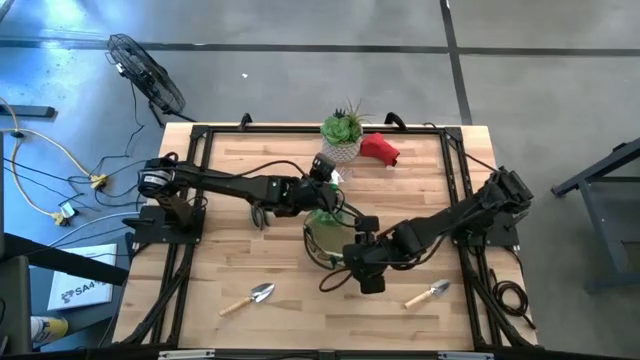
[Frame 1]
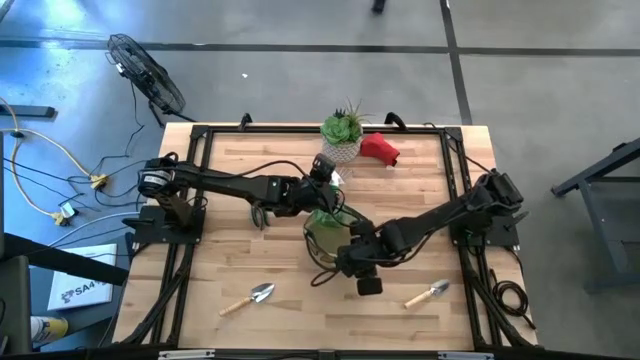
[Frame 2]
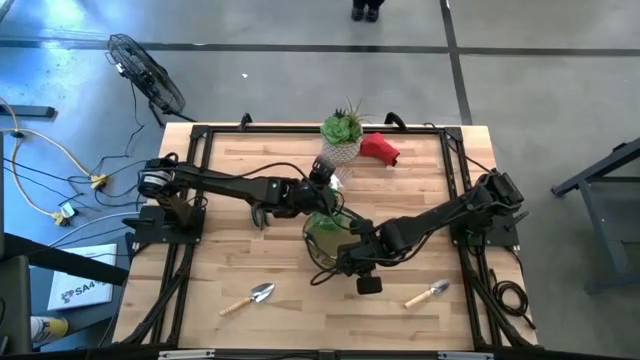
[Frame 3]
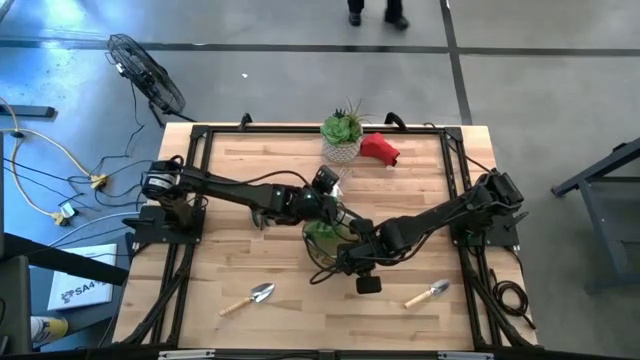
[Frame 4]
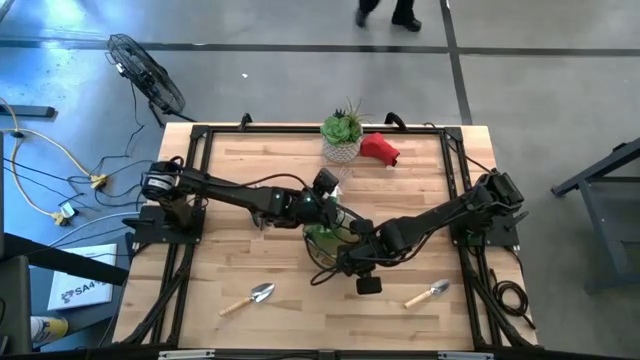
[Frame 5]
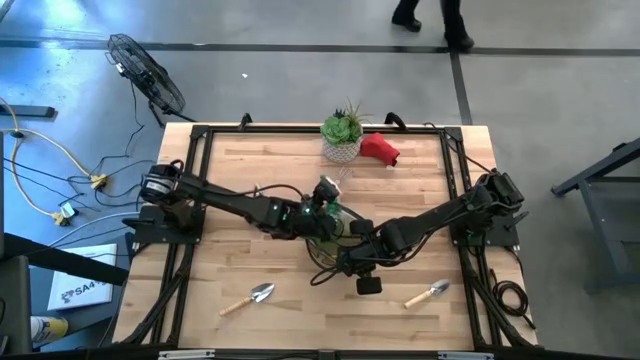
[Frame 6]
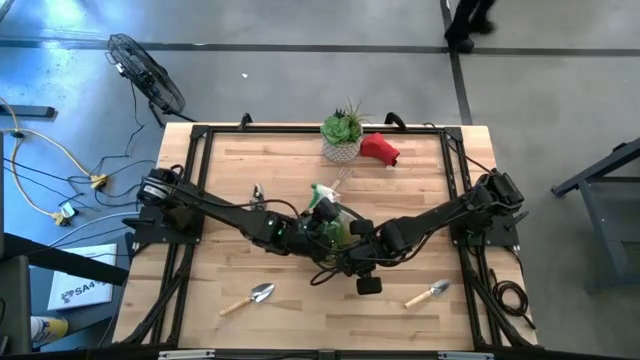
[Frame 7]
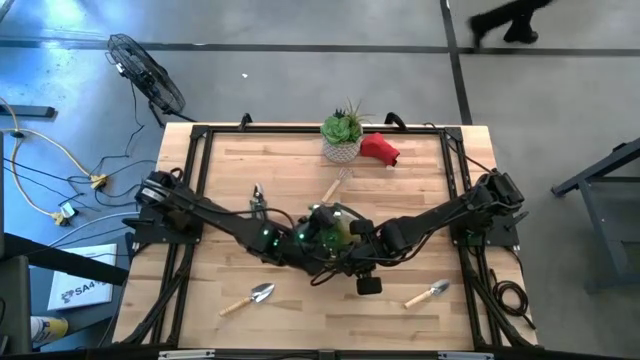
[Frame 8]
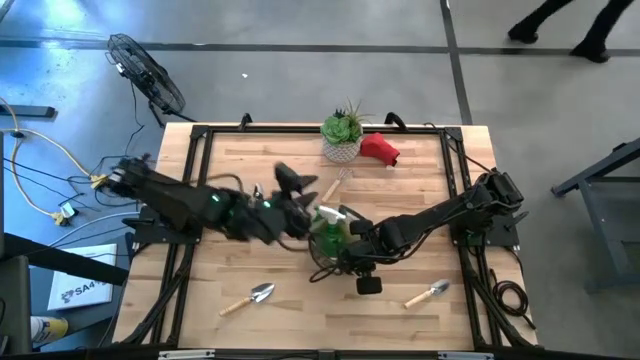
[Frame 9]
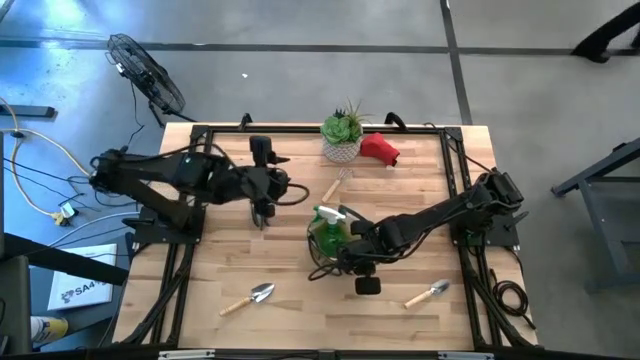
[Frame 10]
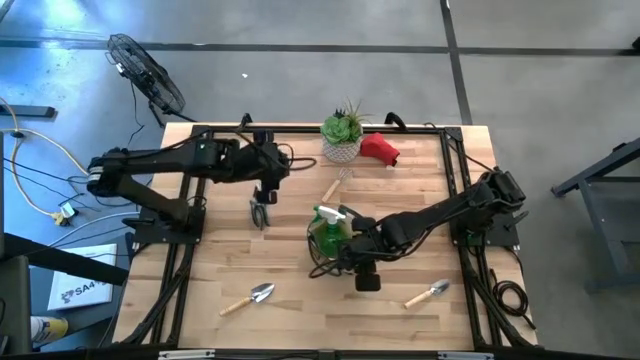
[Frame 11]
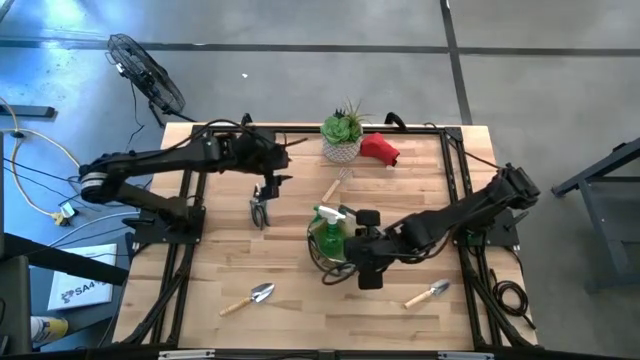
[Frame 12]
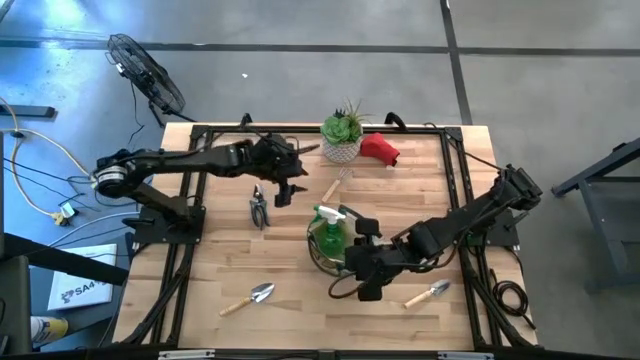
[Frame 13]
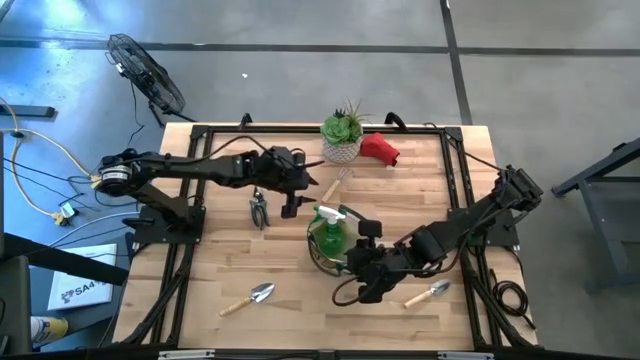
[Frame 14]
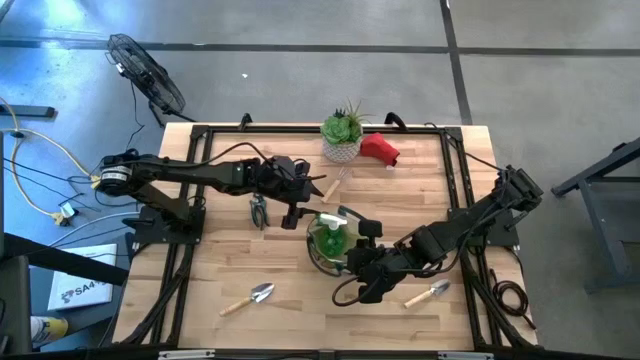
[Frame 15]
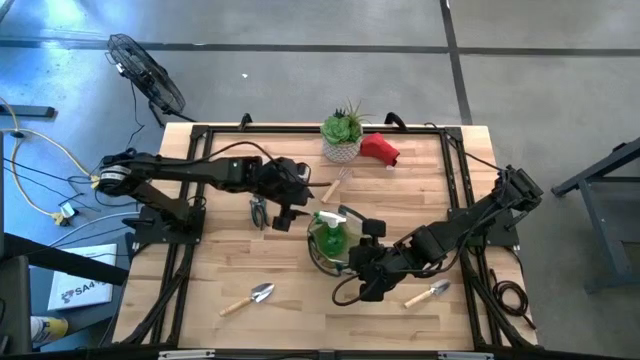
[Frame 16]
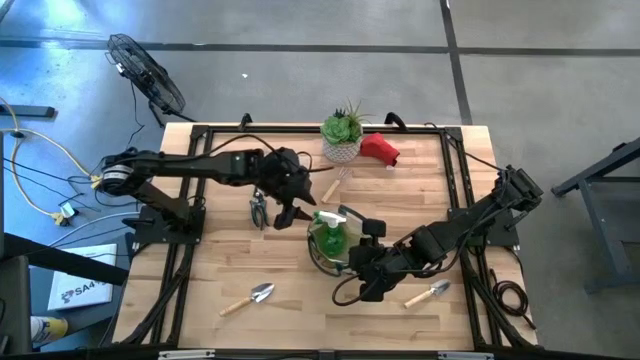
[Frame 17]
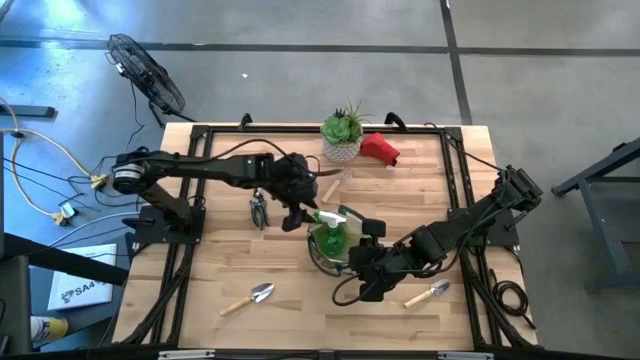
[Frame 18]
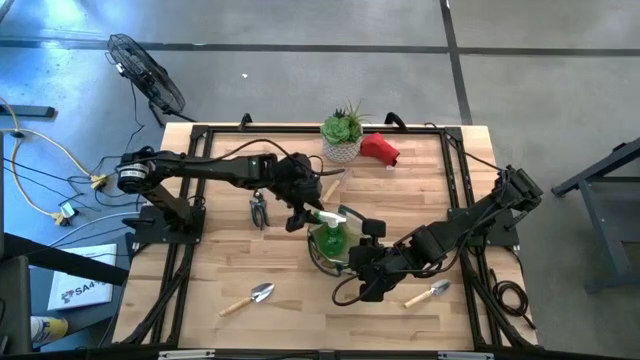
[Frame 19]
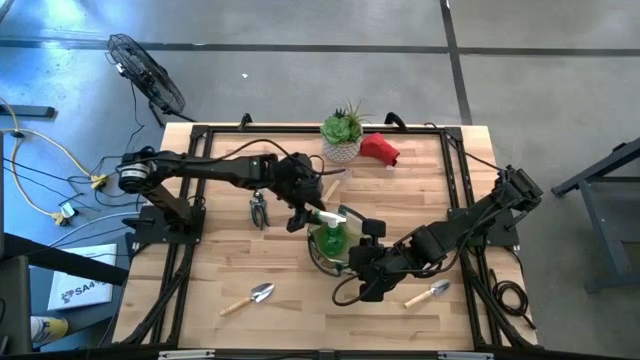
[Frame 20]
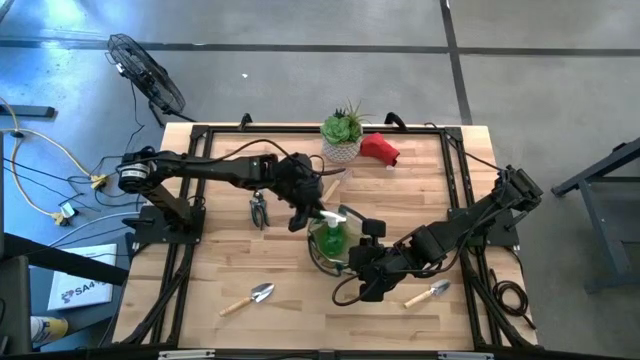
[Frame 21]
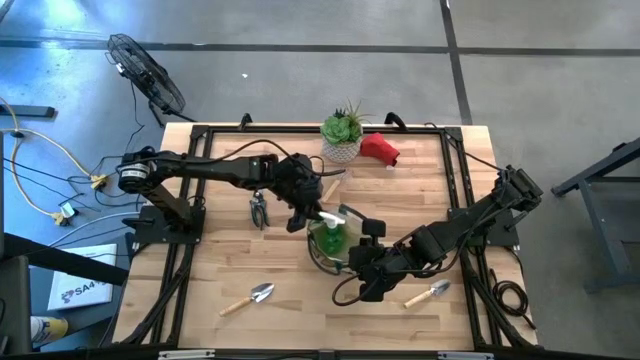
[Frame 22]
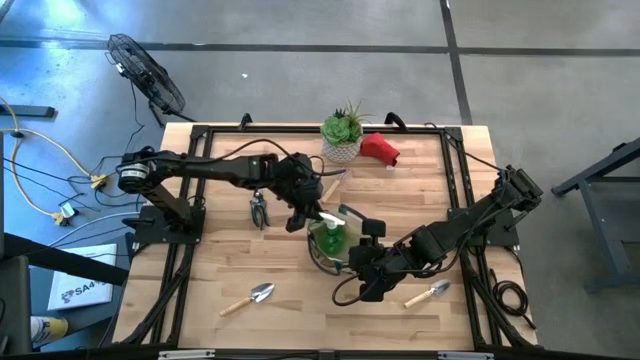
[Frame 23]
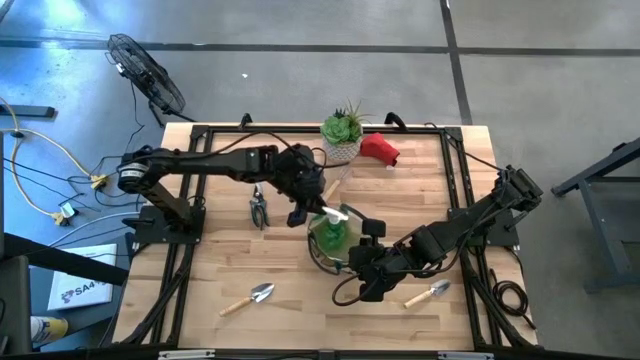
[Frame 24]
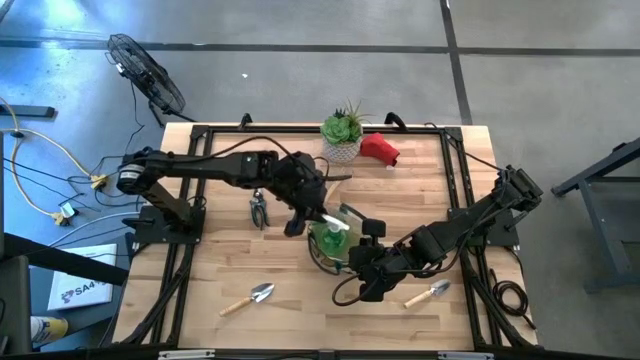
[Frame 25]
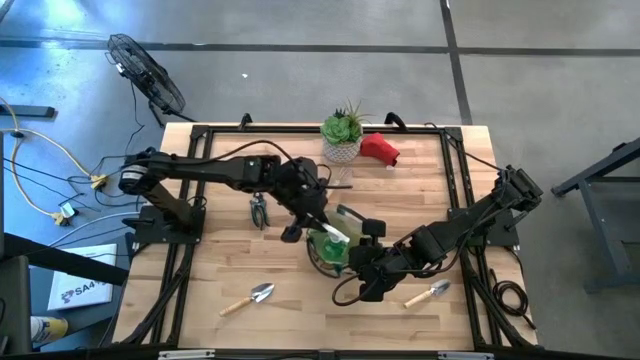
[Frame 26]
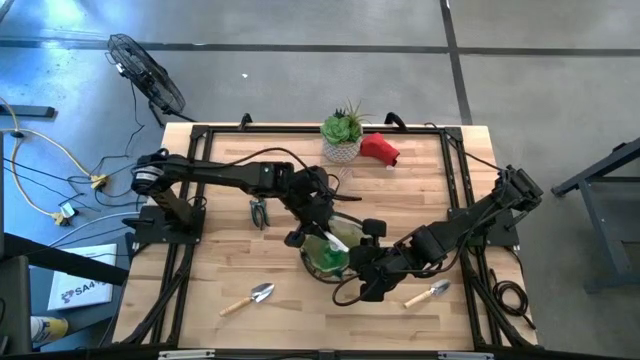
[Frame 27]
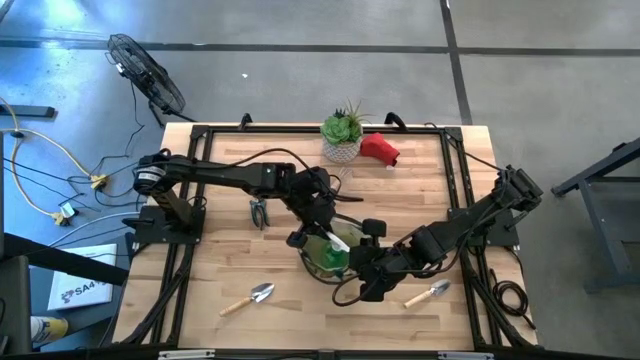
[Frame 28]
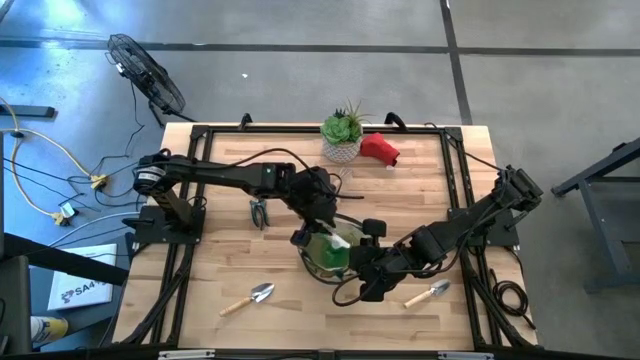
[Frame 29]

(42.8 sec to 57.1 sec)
Task: Pick & Place Garden tools in Gardening bag
Put the green spray bottle into the gardening bag

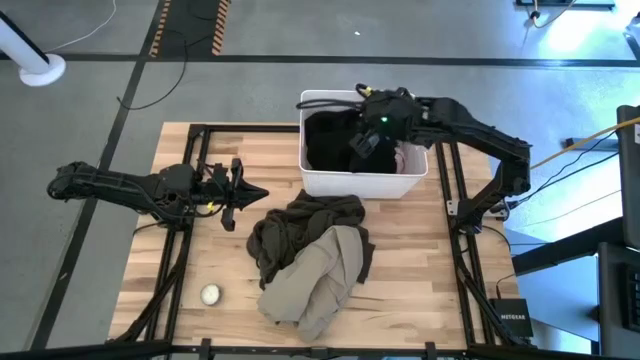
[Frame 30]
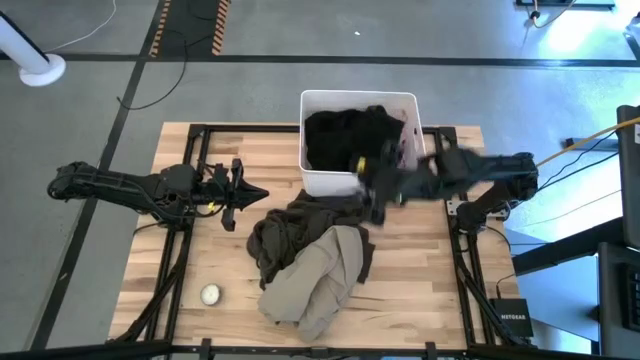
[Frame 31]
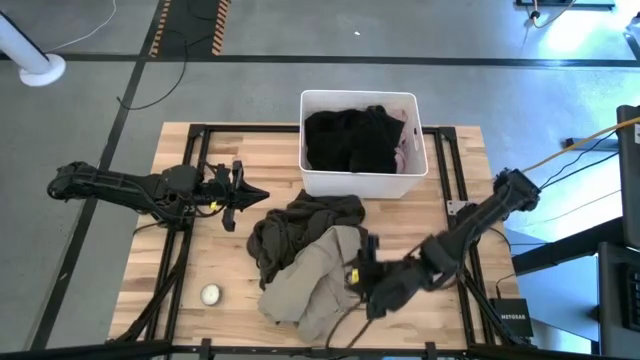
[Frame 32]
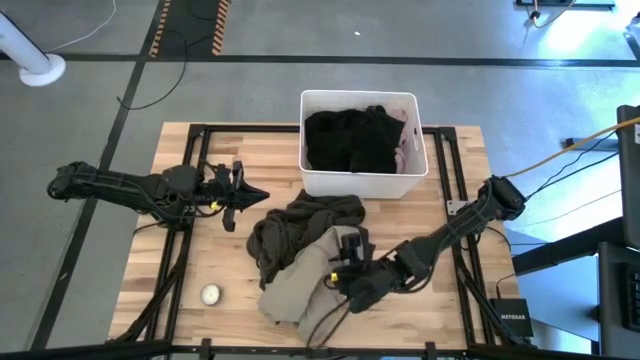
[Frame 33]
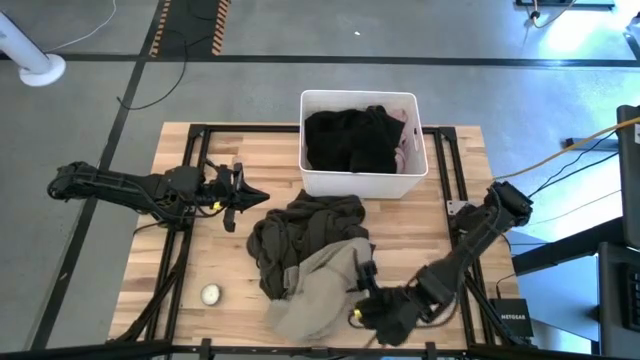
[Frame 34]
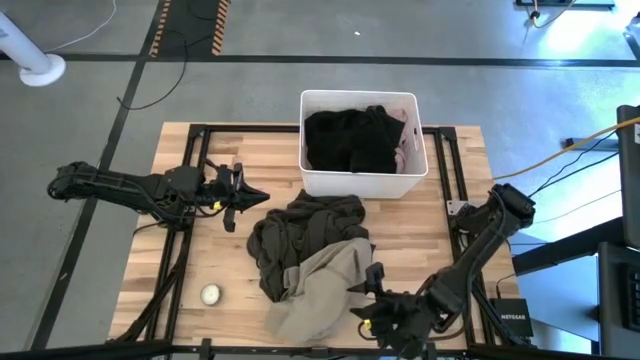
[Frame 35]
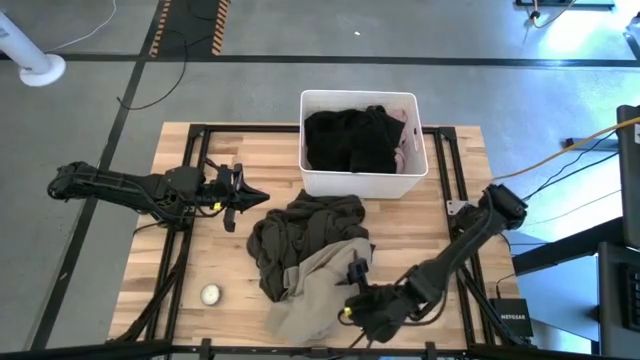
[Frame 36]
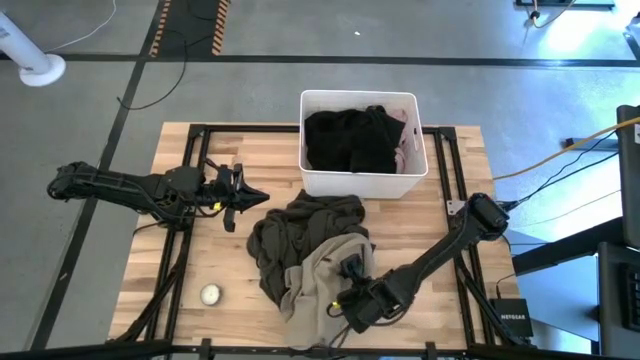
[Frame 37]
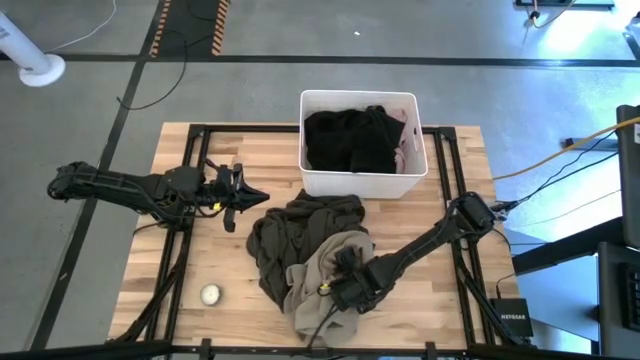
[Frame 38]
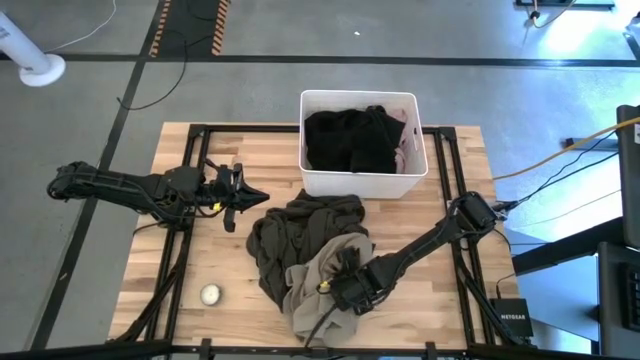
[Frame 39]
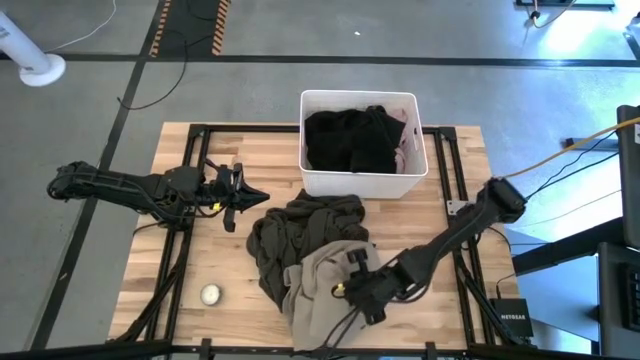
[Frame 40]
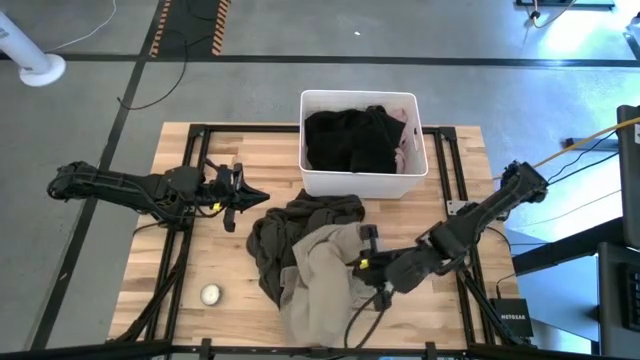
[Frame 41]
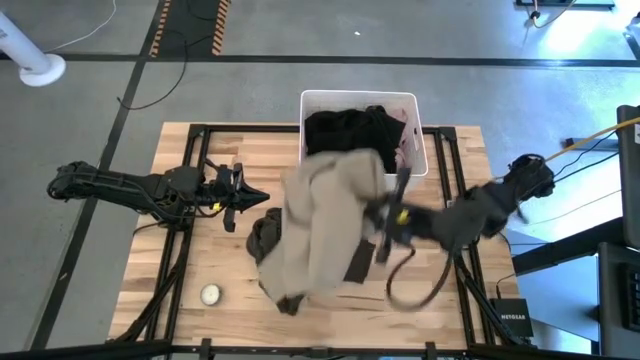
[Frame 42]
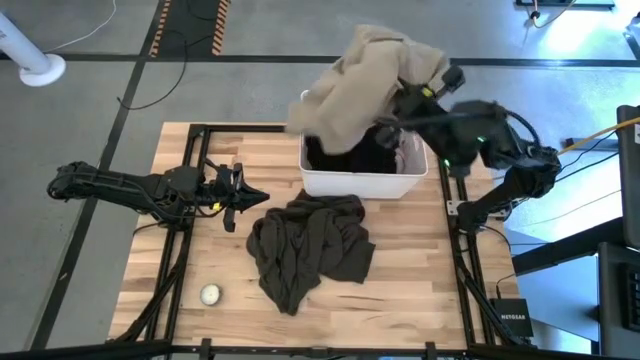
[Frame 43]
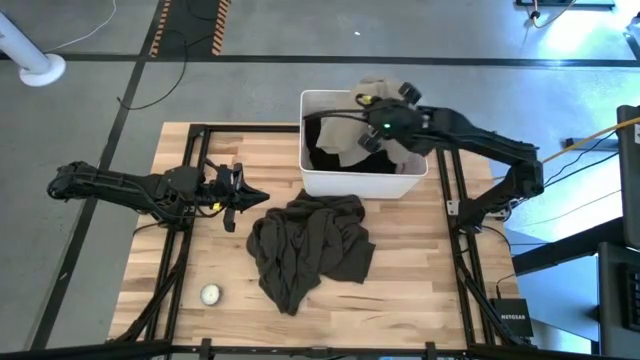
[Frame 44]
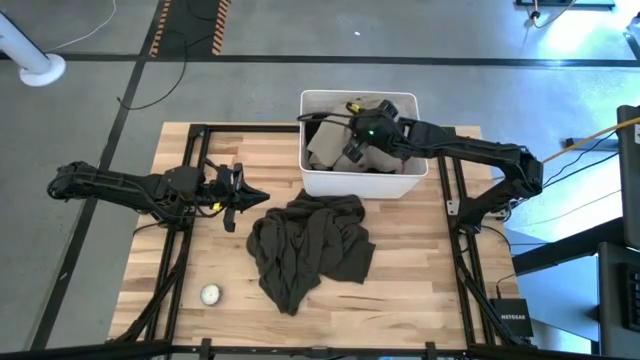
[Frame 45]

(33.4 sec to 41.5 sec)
Task: Sort clothes
Put the light brown shorts into the white laundry bin
